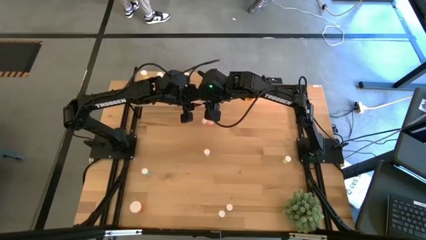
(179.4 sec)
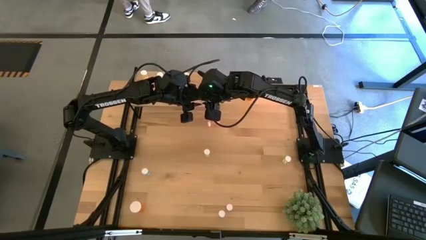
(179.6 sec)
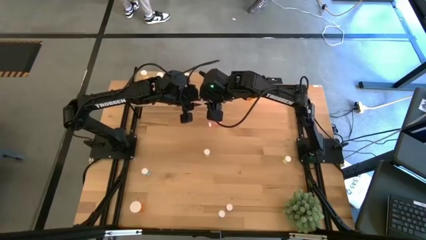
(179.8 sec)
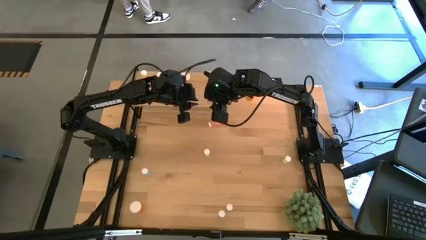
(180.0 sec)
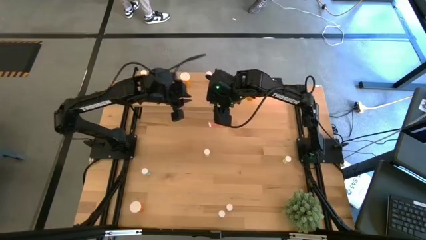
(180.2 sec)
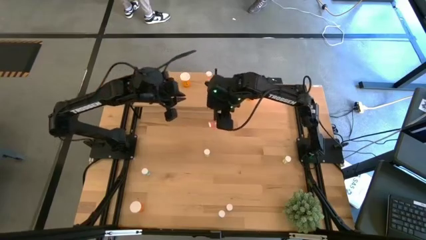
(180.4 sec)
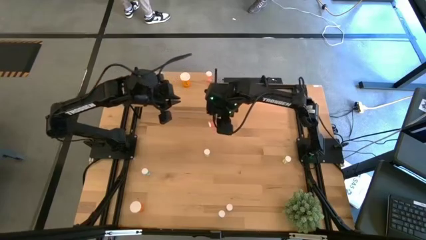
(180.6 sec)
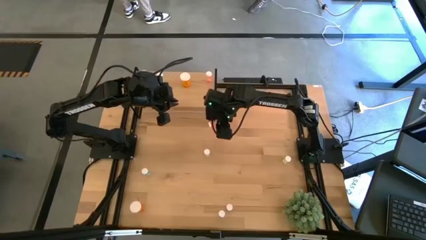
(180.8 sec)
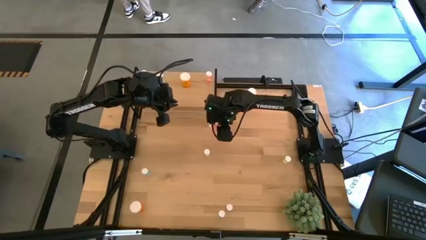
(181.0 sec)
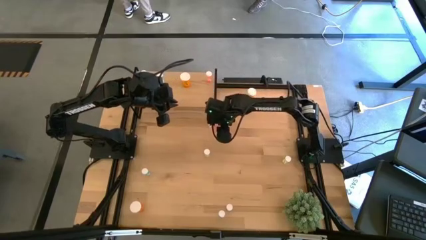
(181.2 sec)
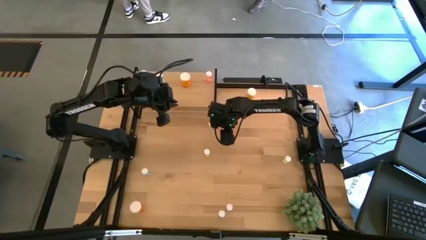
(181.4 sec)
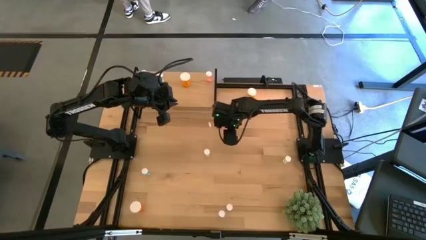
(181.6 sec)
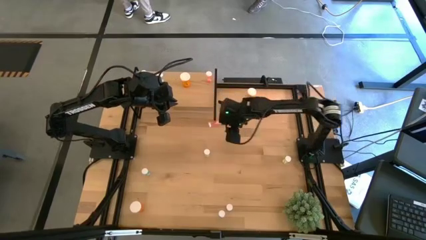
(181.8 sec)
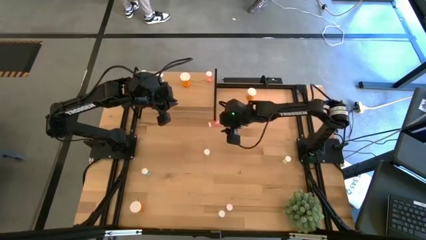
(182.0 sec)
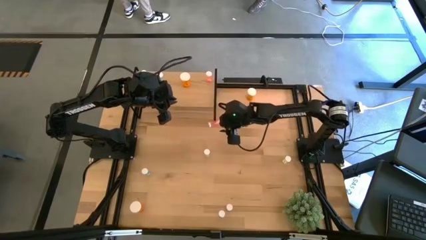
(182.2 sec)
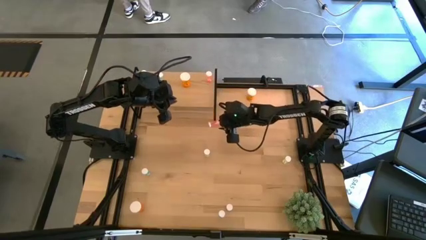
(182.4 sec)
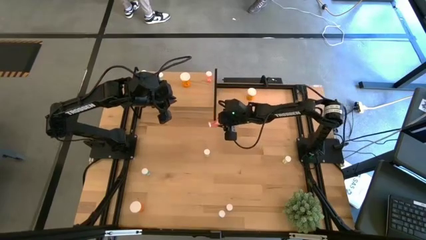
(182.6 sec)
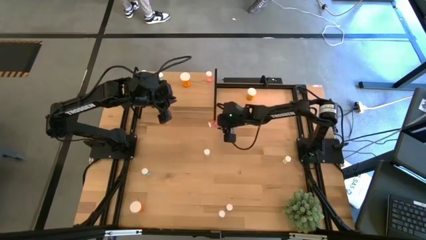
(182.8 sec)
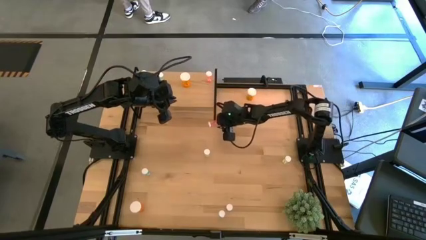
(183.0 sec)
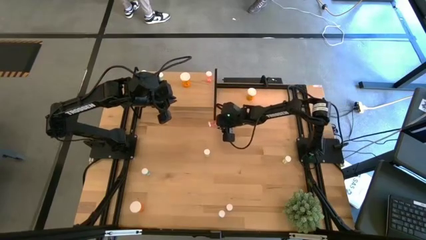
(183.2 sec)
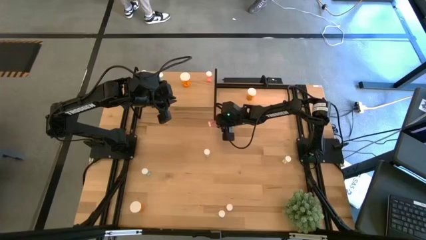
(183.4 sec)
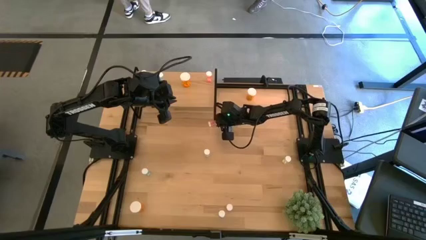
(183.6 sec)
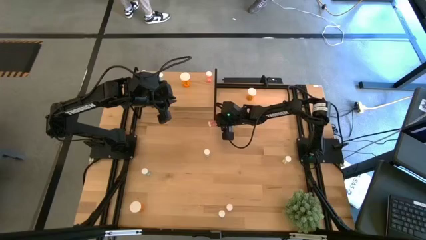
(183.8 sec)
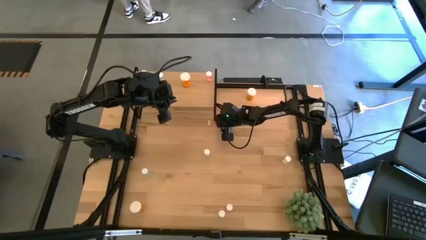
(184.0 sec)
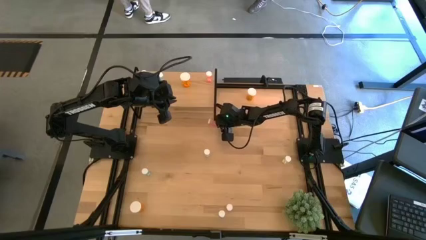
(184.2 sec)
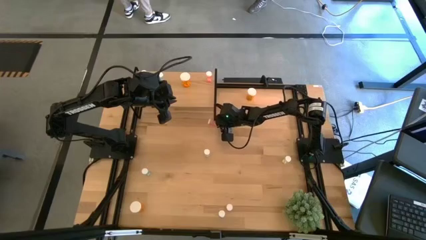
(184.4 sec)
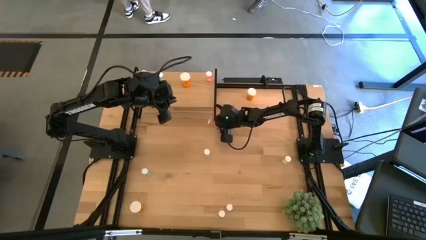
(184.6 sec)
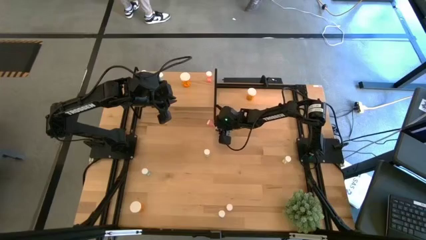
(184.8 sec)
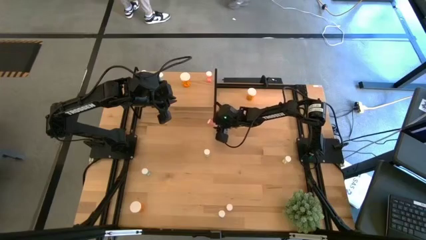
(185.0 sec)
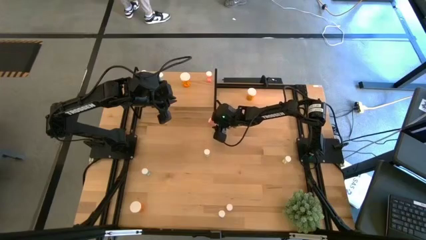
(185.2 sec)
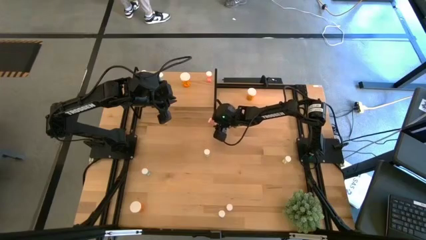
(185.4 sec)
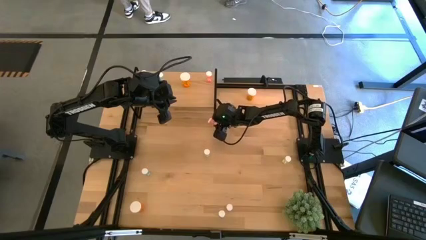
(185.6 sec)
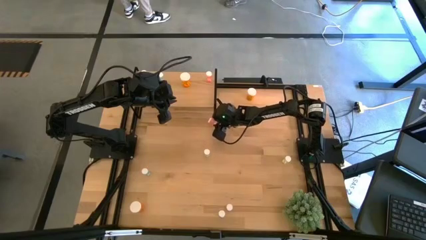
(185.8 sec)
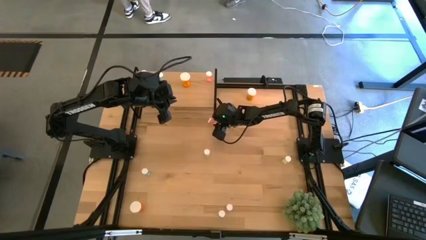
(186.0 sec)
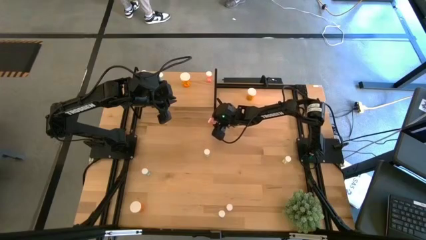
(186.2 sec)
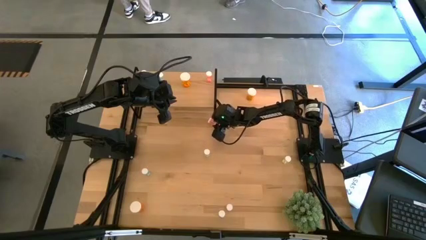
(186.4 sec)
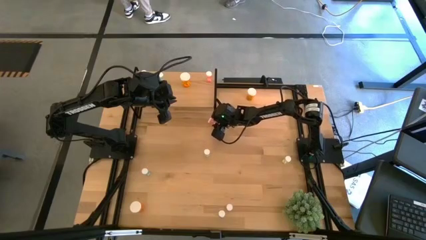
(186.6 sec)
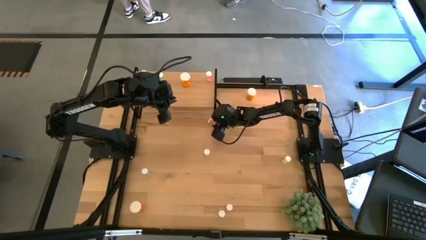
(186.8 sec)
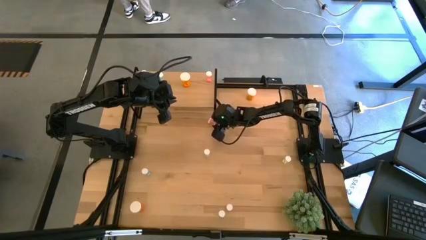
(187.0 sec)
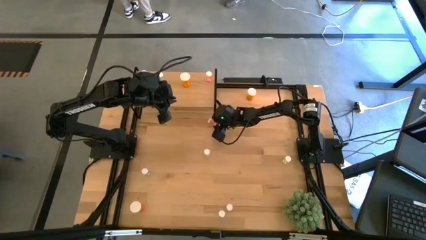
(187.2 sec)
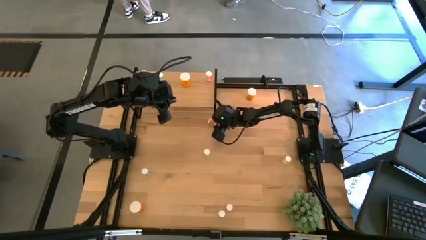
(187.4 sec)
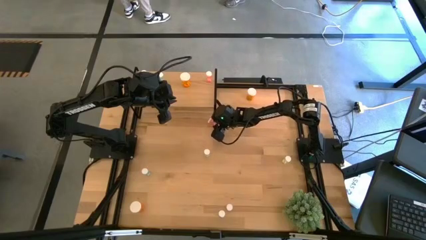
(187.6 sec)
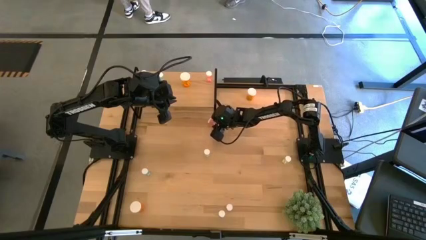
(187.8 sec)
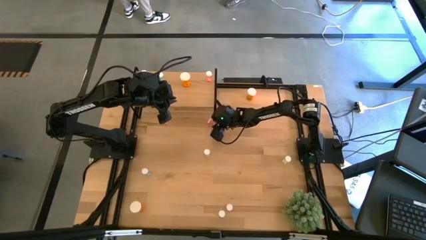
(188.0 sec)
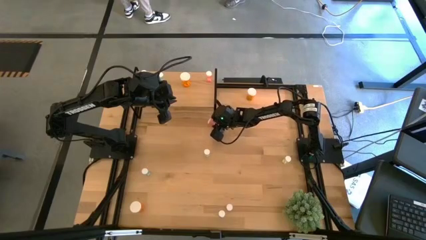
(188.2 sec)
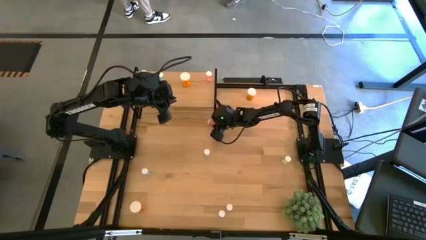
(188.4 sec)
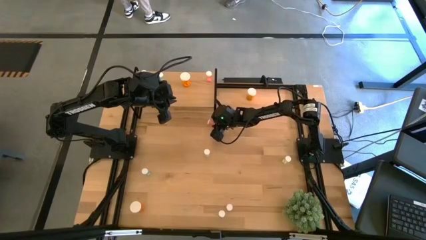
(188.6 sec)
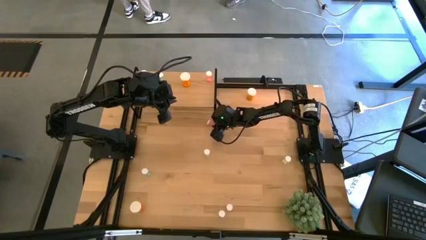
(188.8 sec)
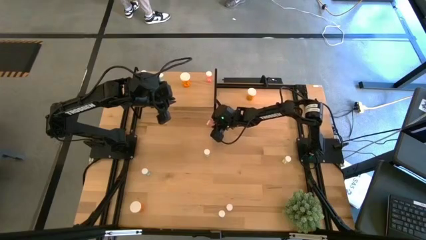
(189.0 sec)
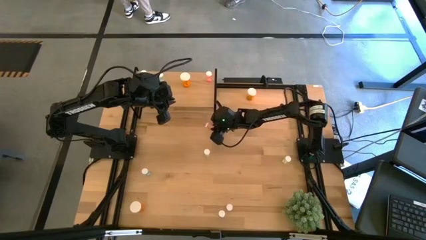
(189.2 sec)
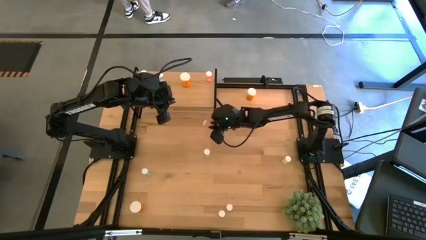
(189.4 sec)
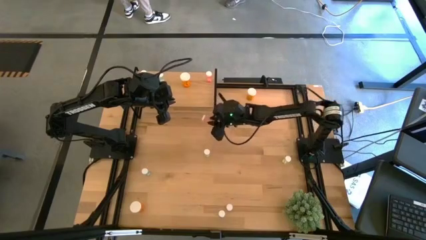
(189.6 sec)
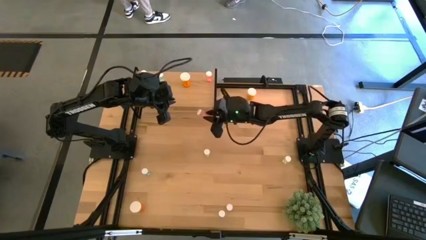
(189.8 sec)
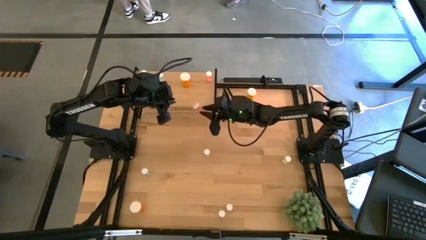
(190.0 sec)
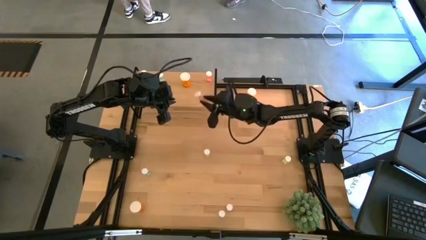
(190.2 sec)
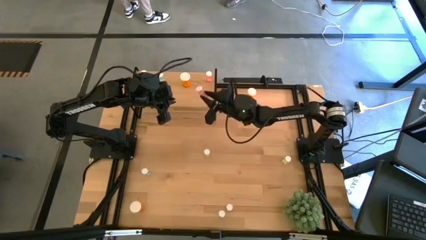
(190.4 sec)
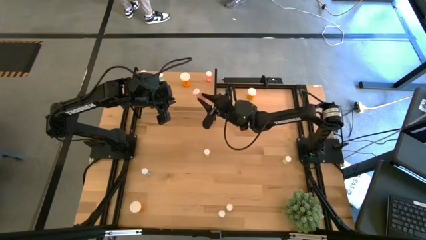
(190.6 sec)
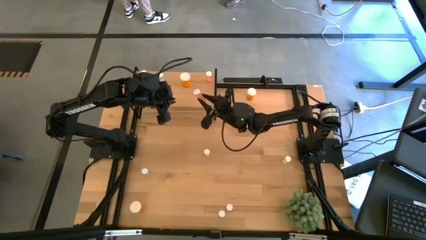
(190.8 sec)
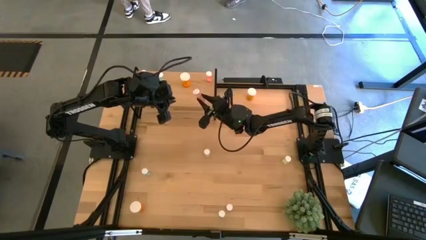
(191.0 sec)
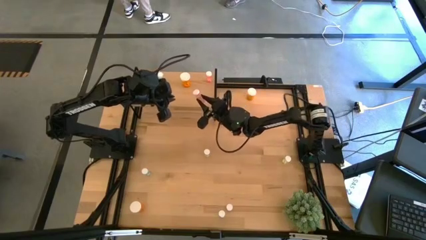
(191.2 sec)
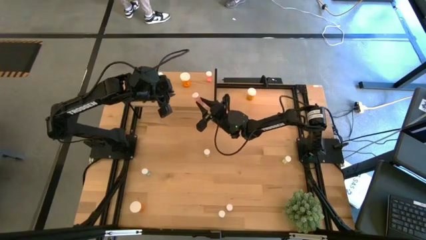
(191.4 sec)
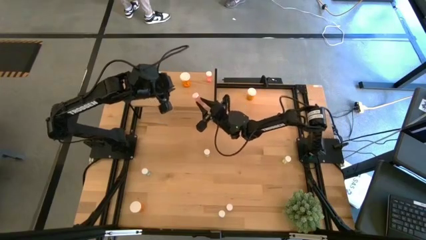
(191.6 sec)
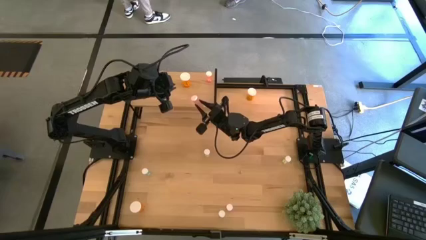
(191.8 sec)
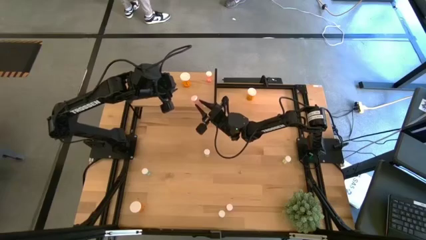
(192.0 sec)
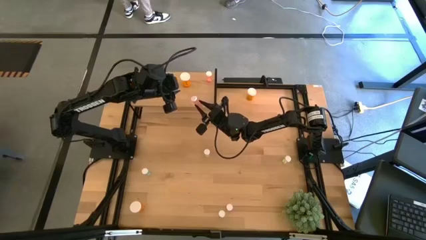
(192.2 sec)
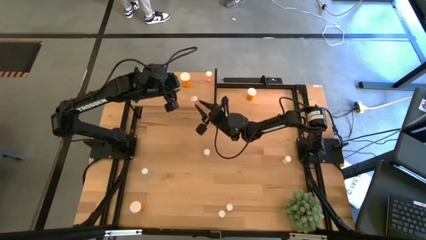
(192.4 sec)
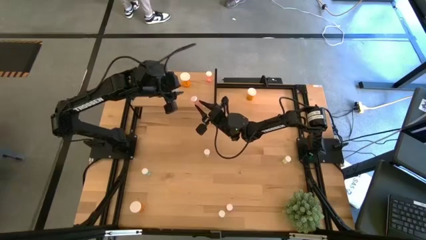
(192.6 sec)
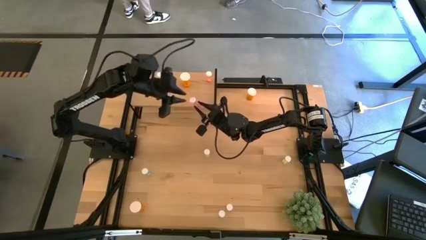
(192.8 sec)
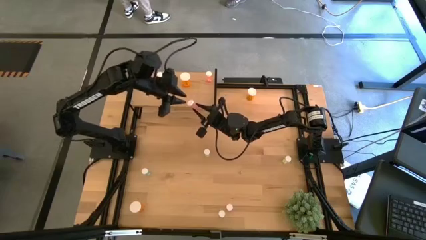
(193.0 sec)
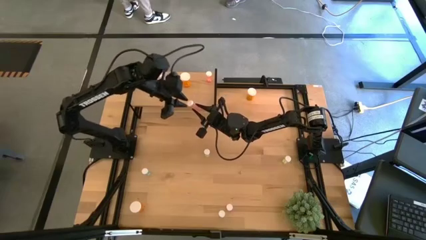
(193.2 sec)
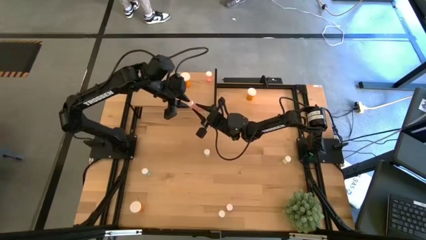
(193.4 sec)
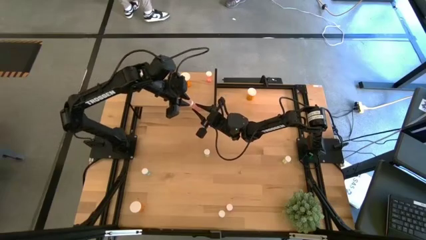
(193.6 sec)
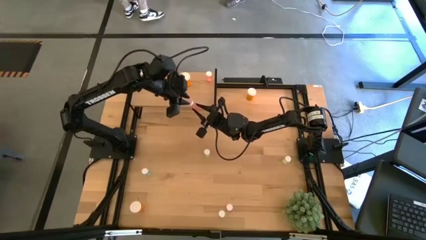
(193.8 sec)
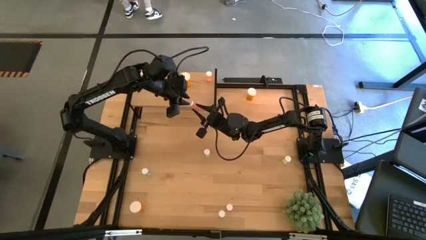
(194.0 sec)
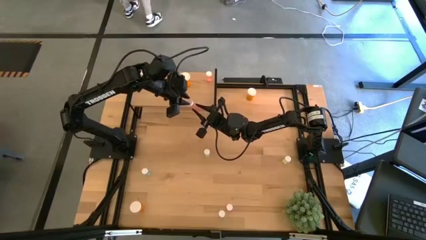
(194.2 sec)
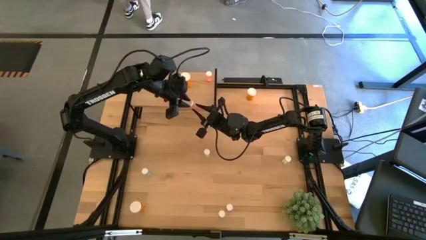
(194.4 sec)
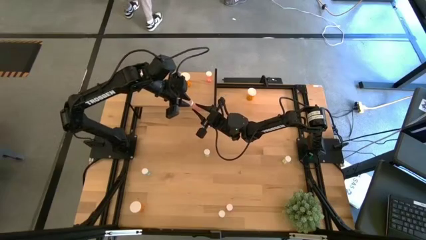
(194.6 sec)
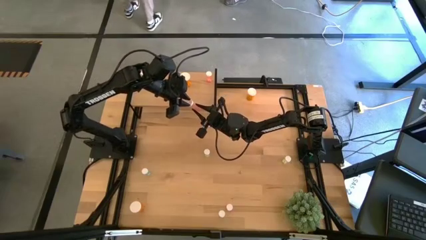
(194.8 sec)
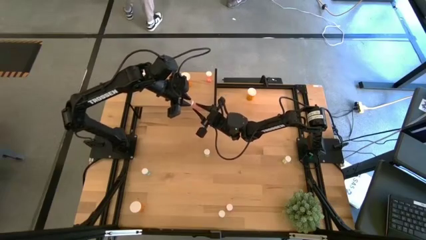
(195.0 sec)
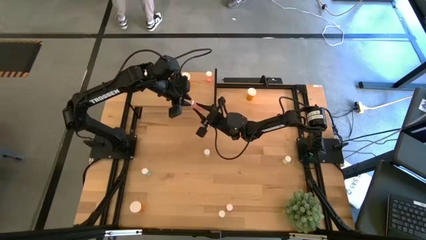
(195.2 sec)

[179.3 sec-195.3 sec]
Task: Pick and place medicine bottles onto shelf by color
Put the top red pill bottle on the shelf aligned with the red pill bottle on the shelf
